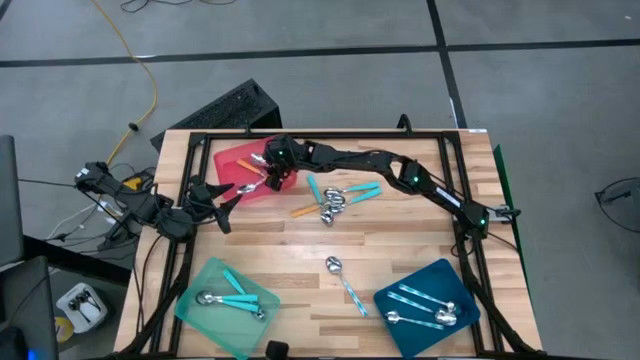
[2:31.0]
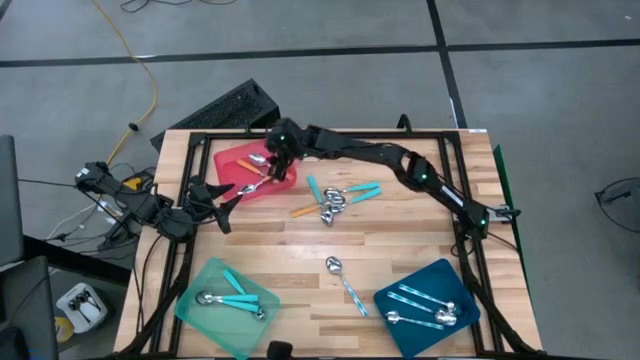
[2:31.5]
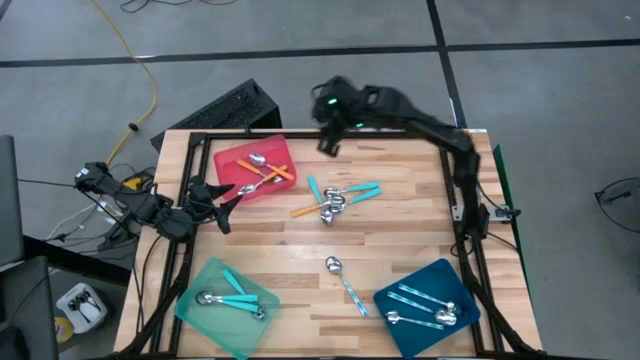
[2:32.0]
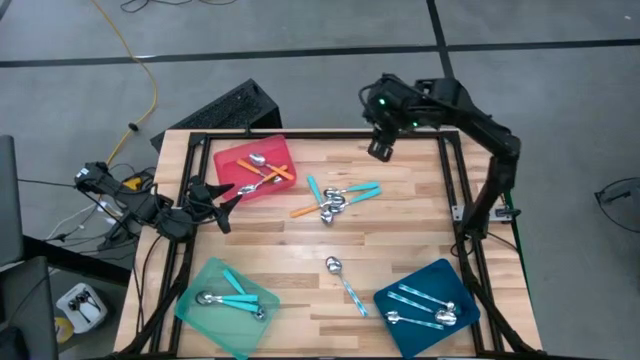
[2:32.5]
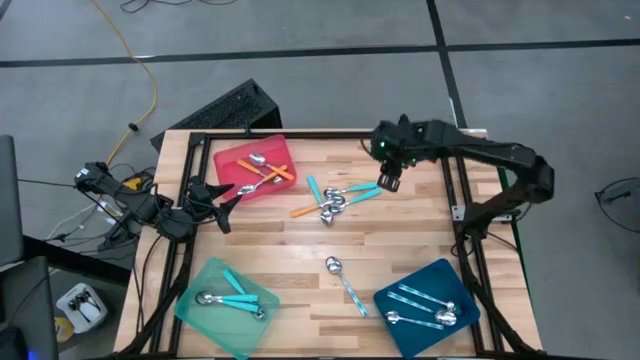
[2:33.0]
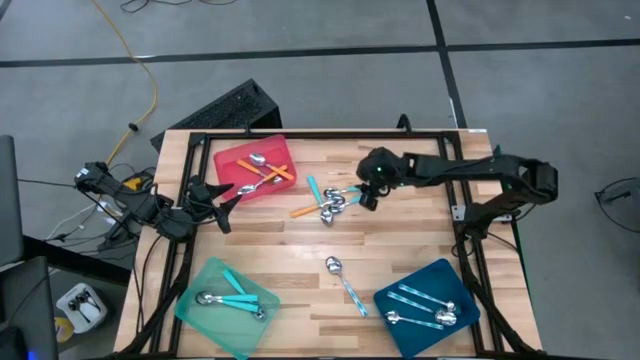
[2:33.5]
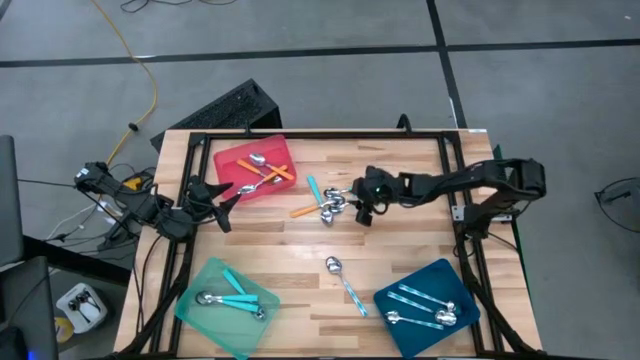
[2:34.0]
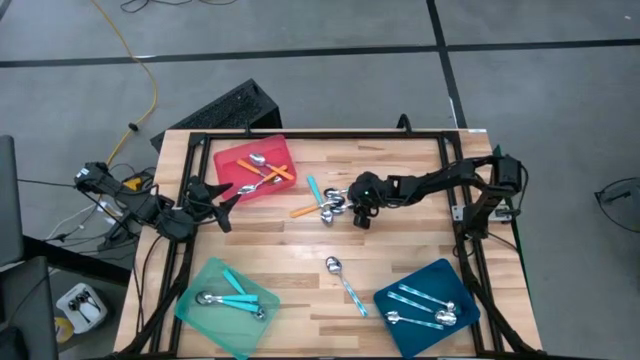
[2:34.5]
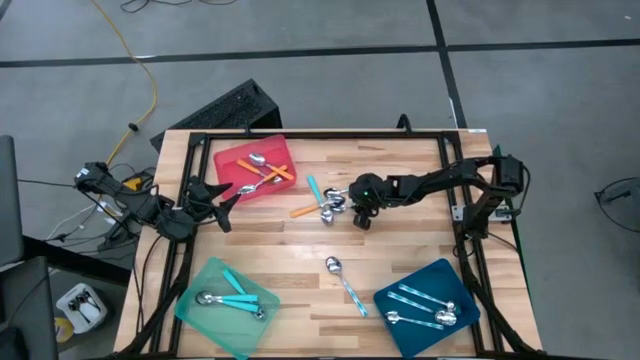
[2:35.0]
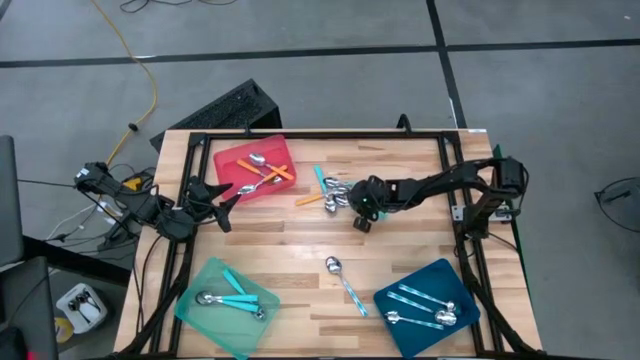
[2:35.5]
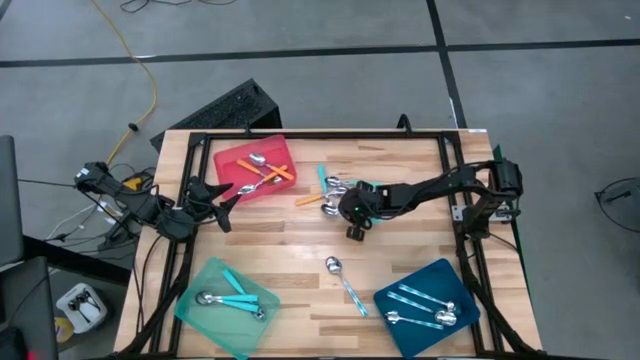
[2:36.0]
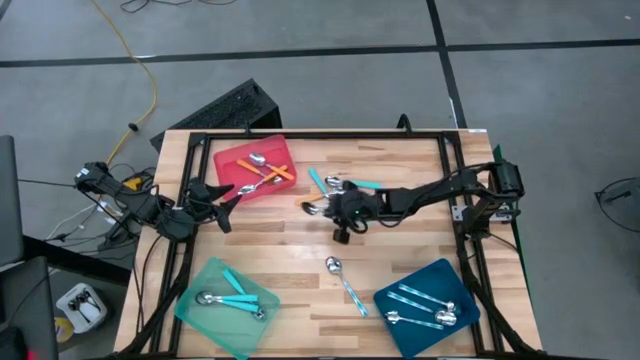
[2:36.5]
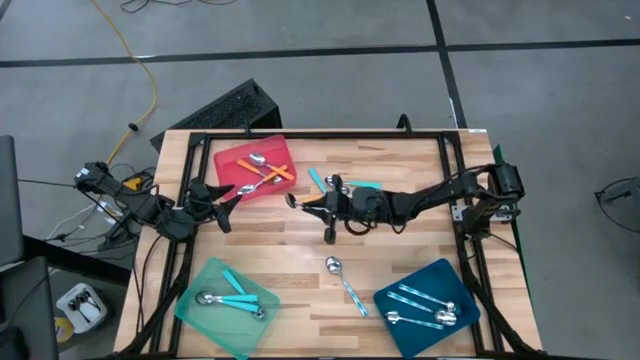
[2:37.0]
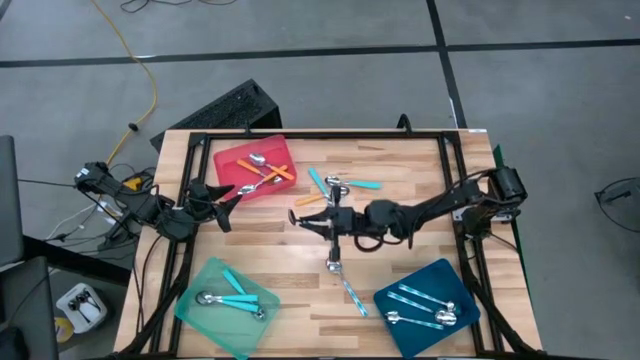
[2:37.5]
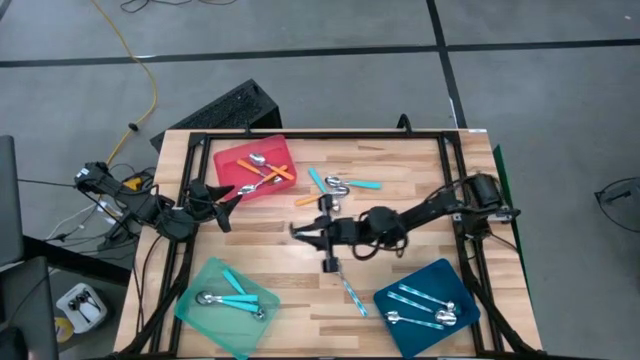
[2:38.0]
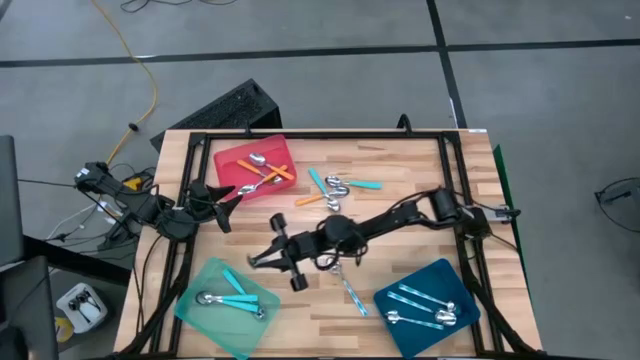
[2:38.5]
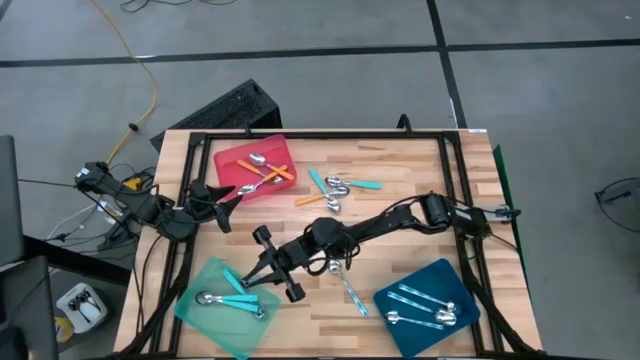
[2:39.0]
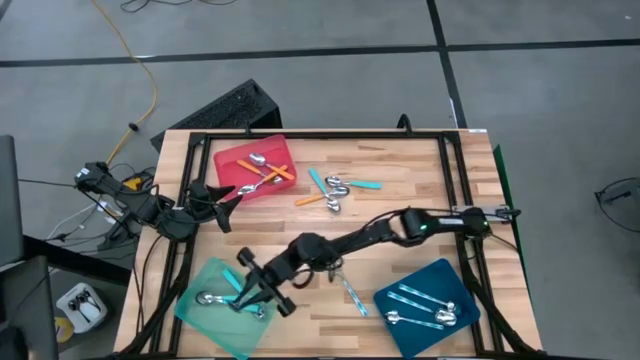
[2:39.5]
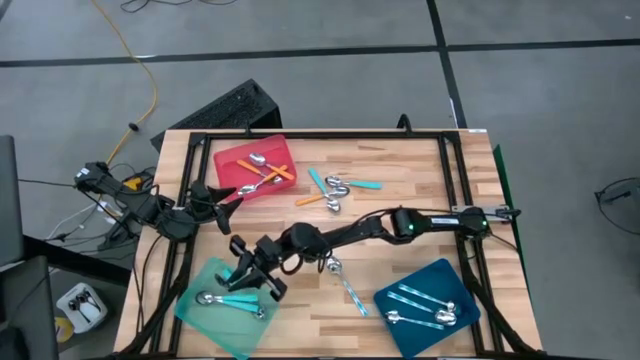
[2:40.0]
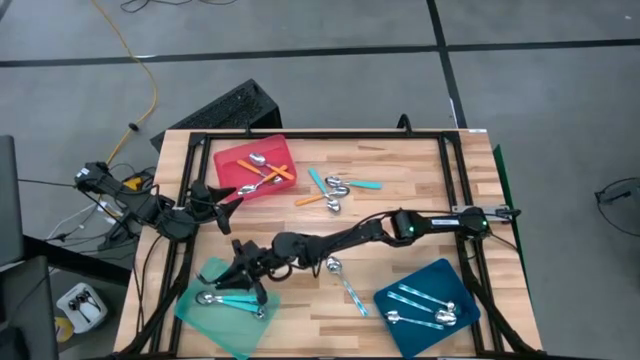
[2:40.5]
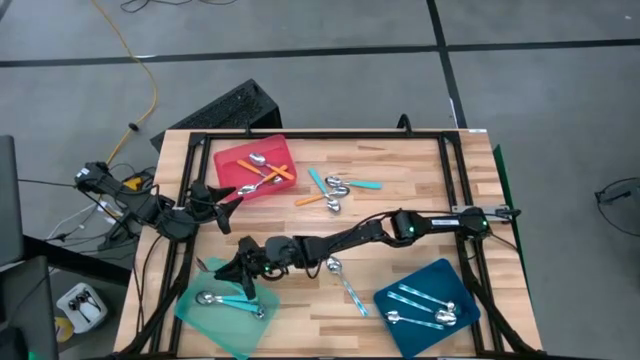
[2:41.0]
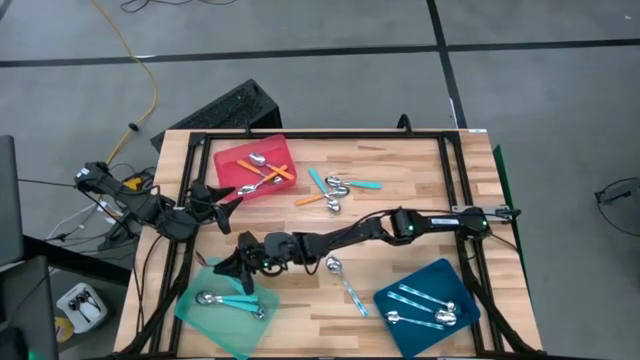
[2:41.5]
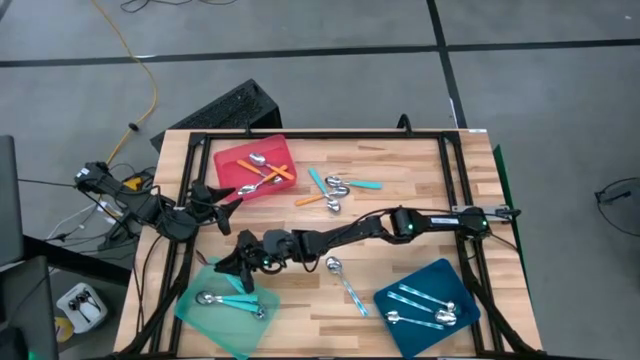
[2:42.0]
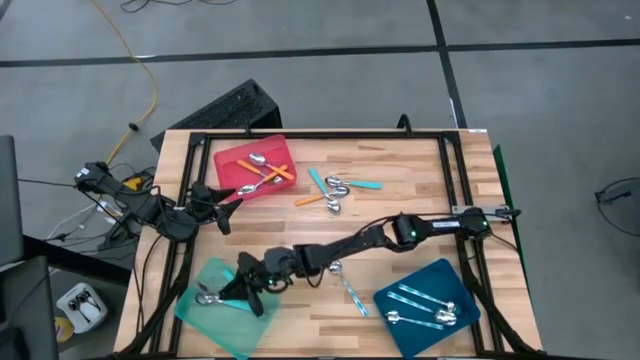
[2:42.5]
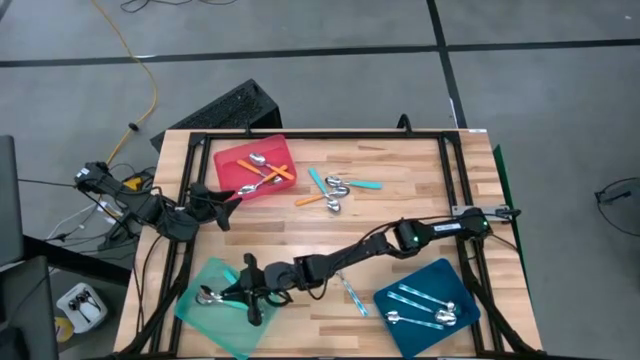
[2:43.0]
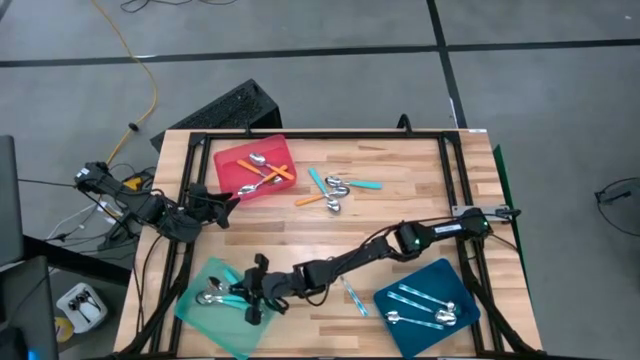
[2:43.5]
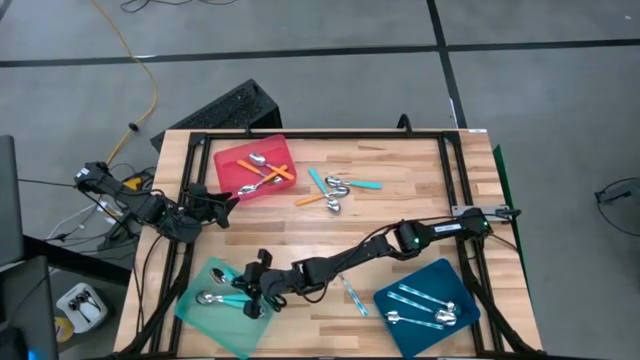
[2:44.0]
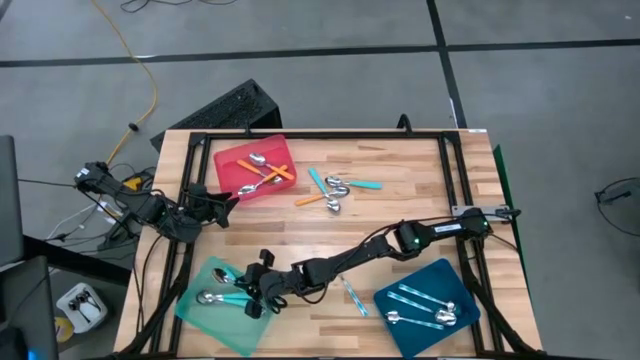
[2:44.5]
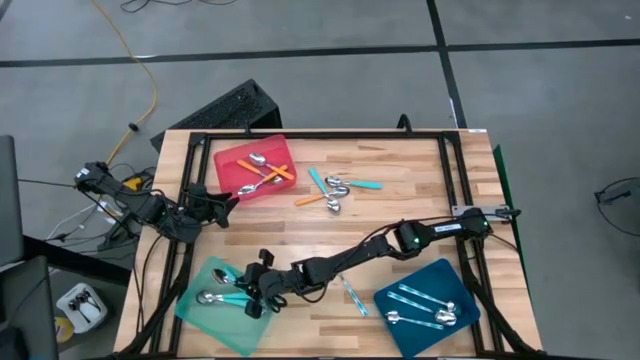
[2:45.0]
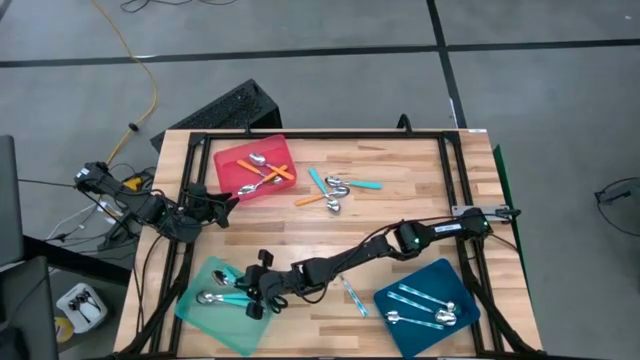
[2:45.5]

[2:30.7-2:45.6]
Task: Sort silverware by color (type)
Put the blue spoon into the light blue bin

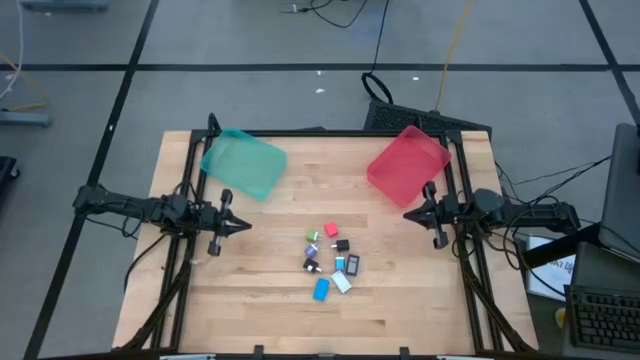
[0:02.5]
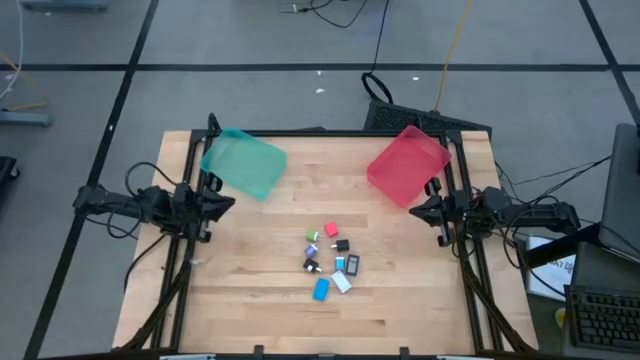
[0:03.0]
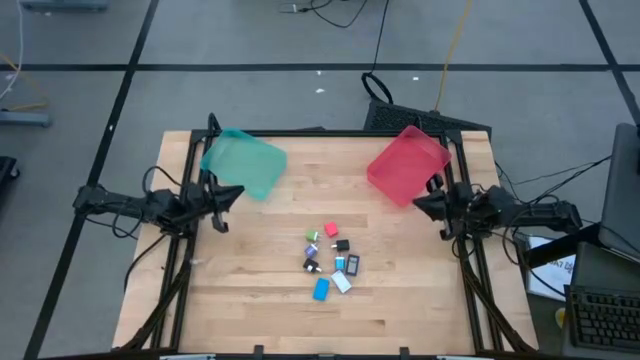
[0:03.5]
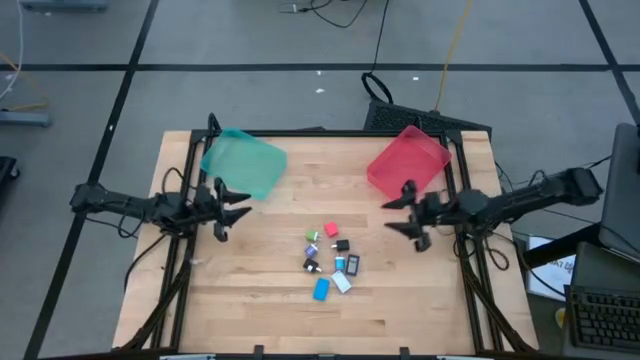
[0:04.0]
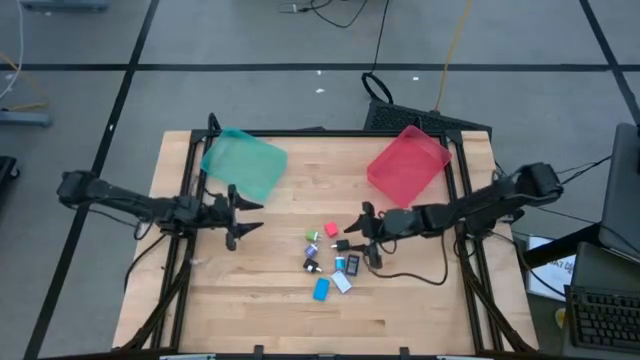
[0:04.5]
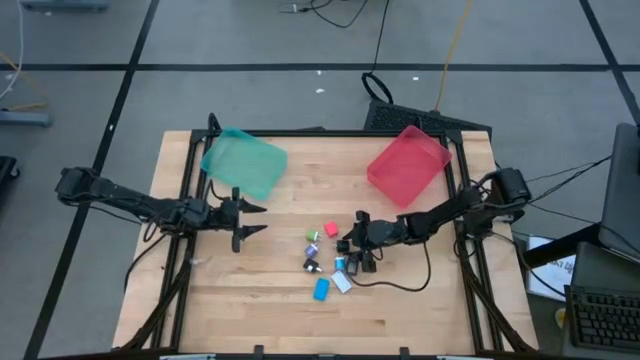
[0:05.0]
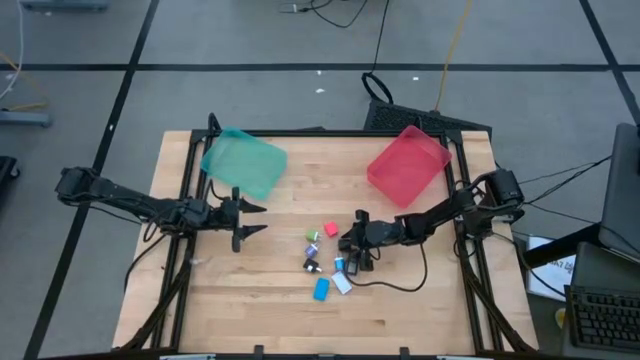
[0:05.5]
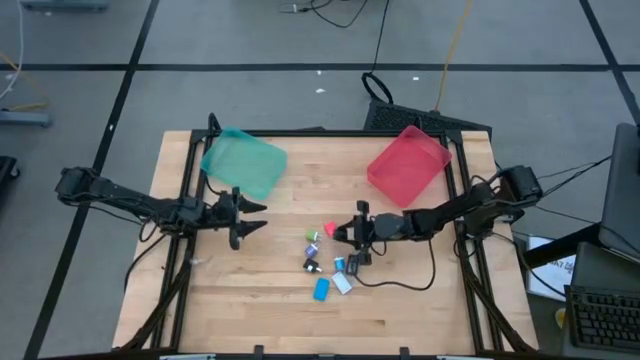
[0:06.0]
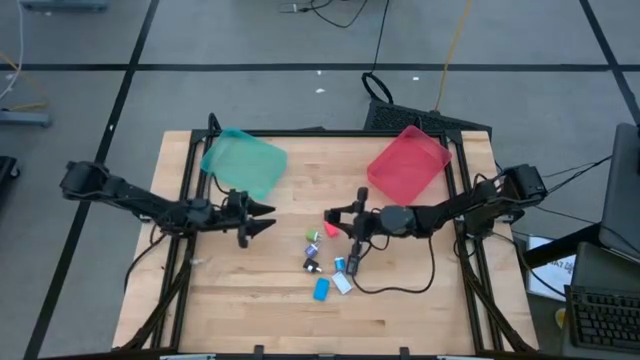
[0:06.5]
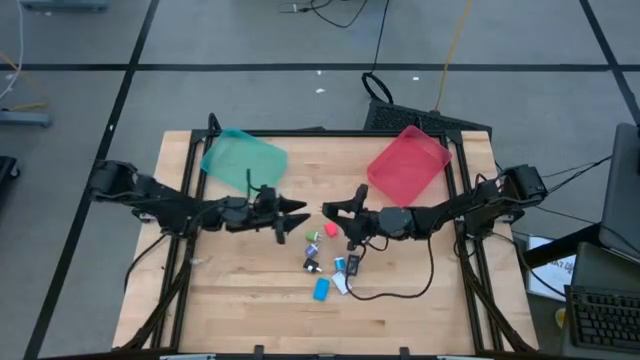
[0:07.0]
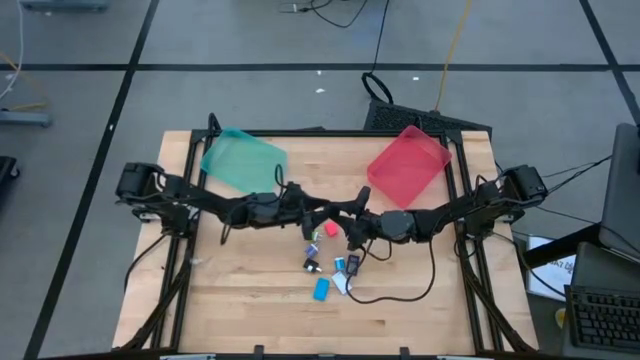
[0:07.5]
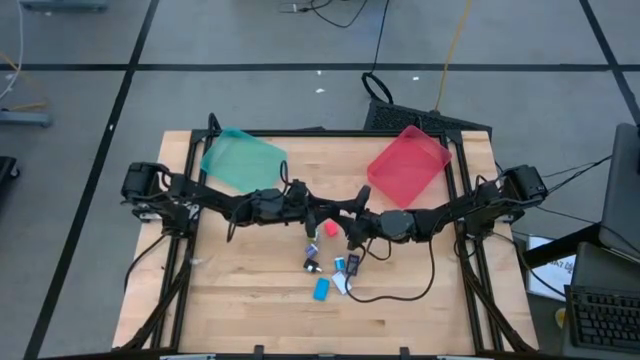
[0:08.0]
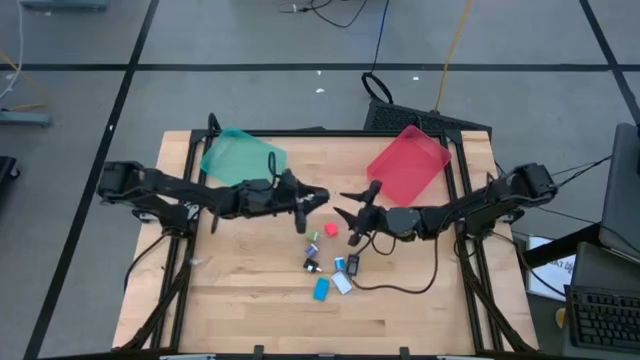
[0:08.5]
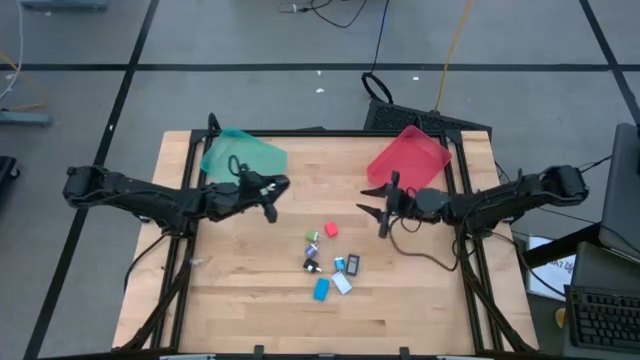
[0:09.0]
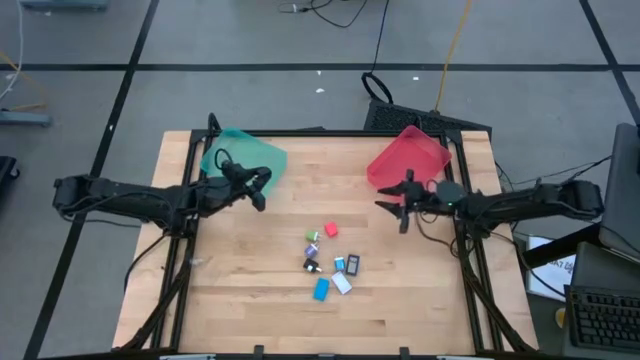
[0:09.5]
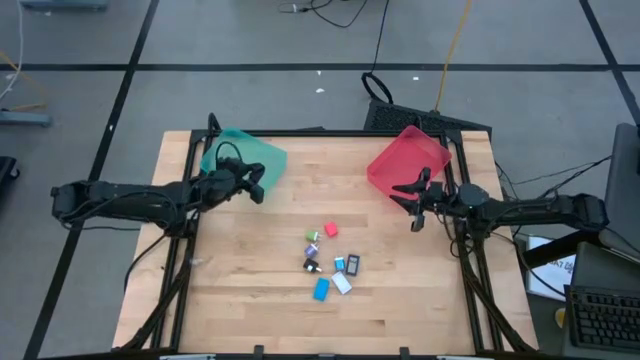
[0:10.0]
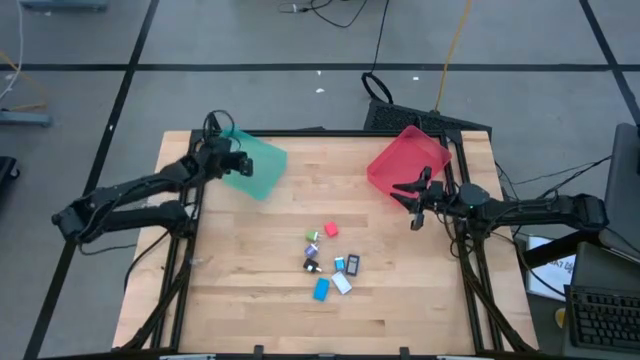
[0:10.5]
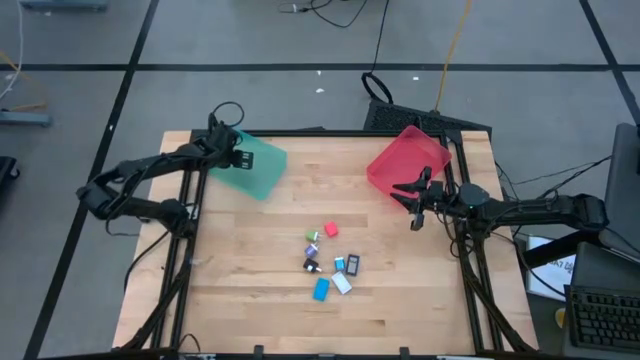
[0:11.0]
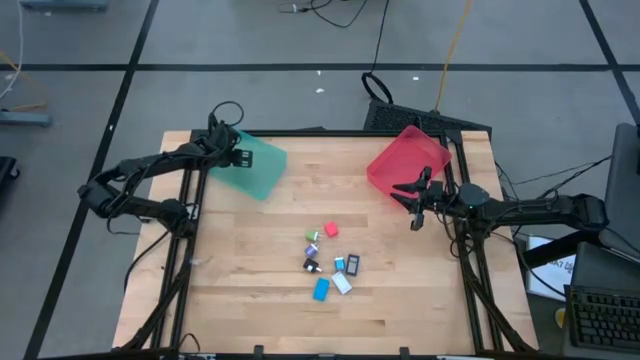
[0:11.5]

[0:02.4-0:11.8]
Task: Pick & Place Office items
Put the right black charger adapter into the blue bin
